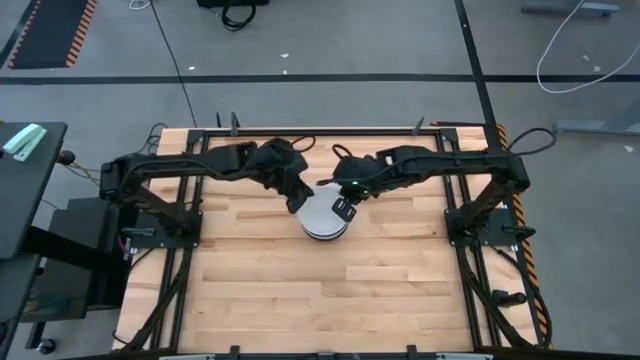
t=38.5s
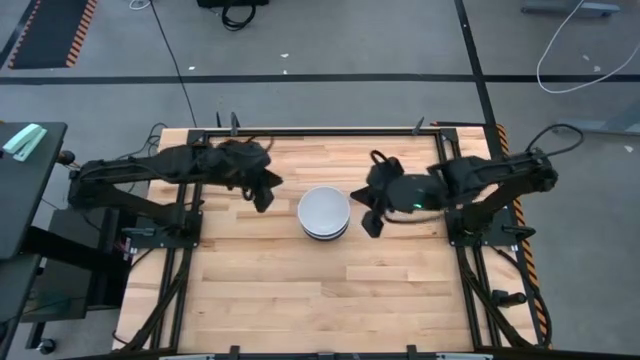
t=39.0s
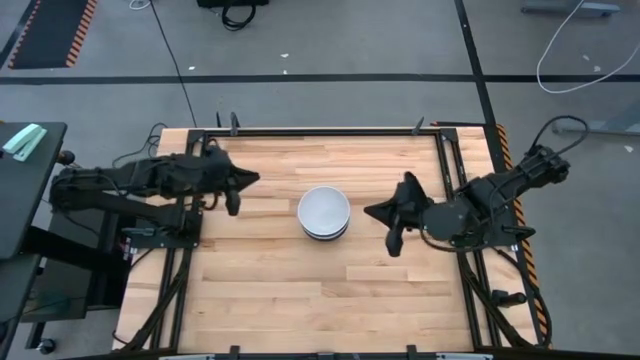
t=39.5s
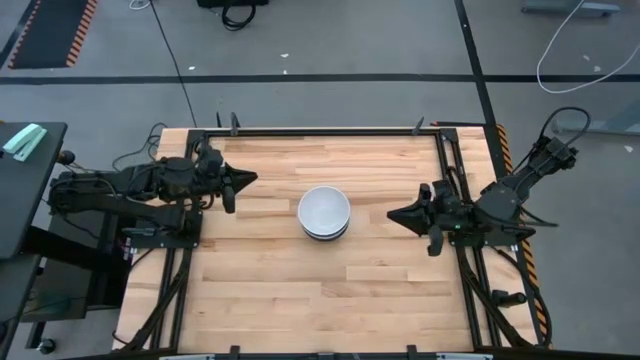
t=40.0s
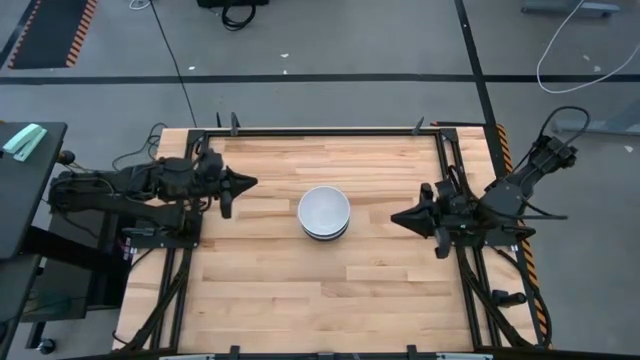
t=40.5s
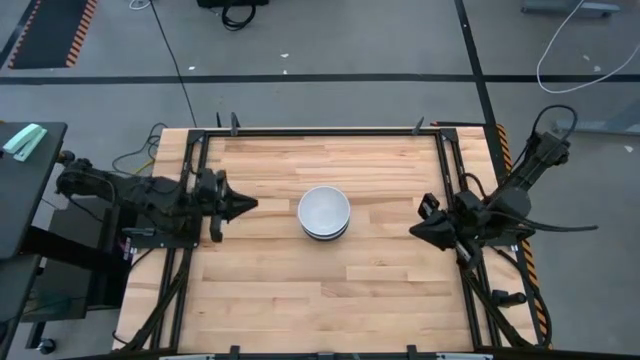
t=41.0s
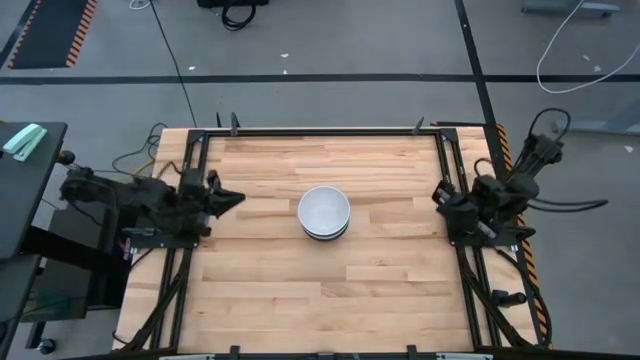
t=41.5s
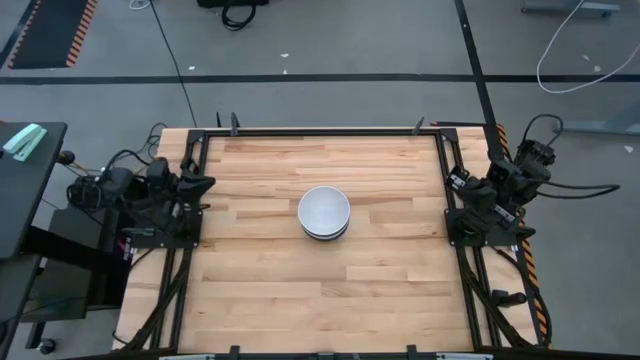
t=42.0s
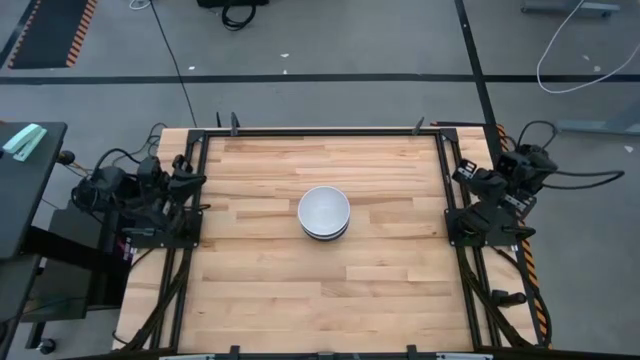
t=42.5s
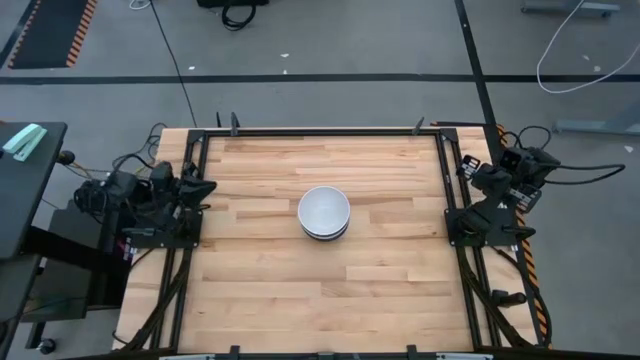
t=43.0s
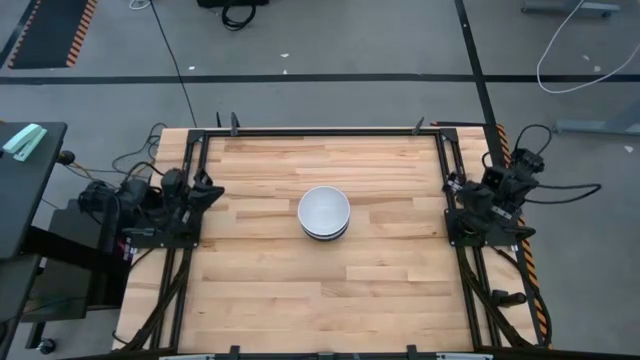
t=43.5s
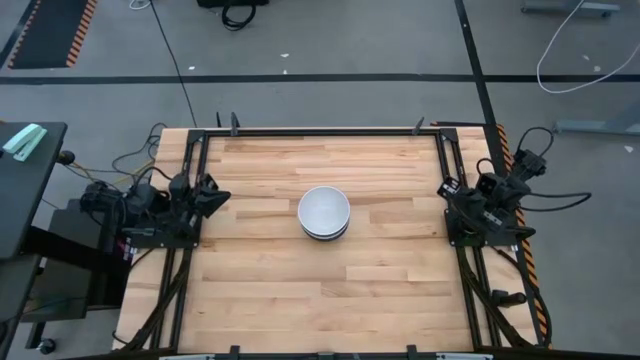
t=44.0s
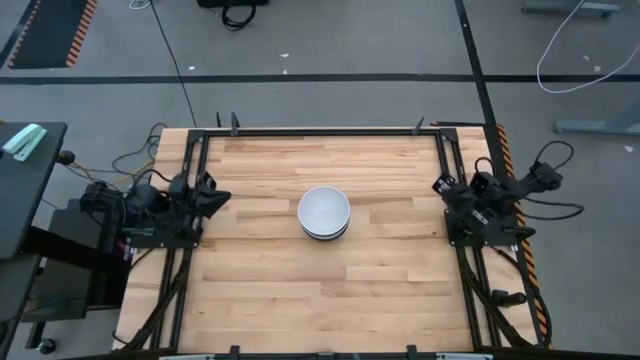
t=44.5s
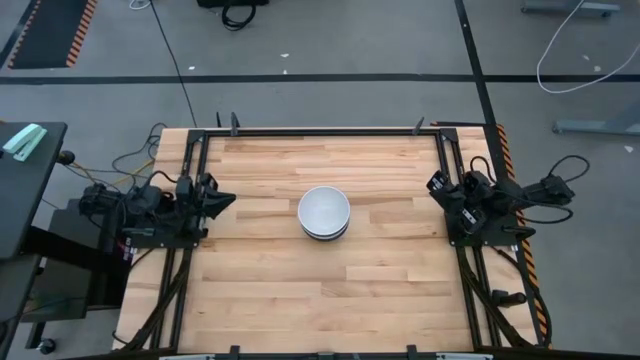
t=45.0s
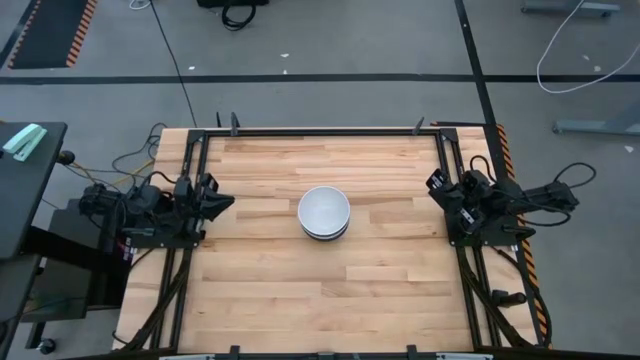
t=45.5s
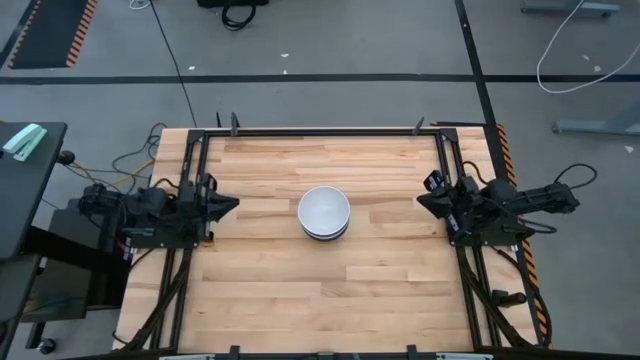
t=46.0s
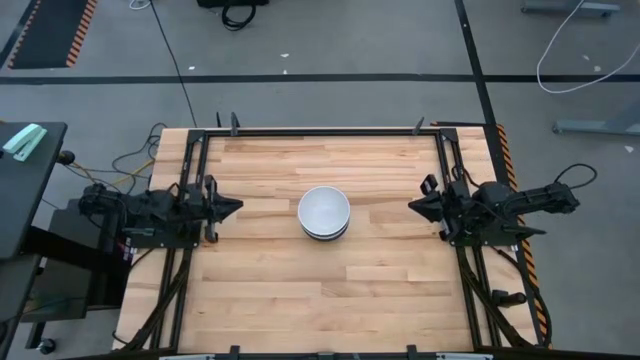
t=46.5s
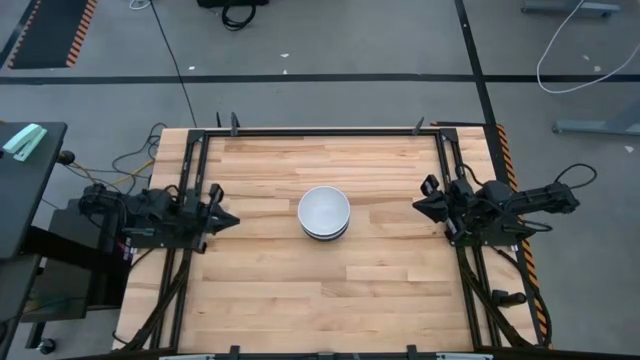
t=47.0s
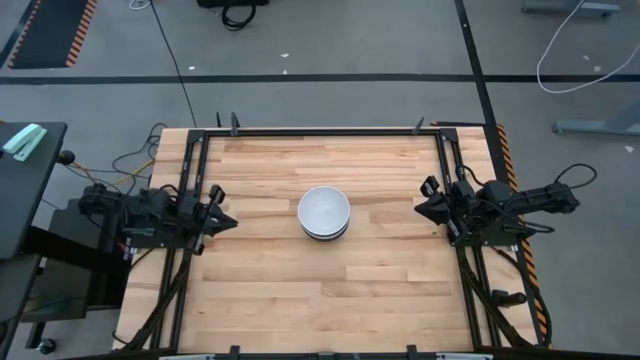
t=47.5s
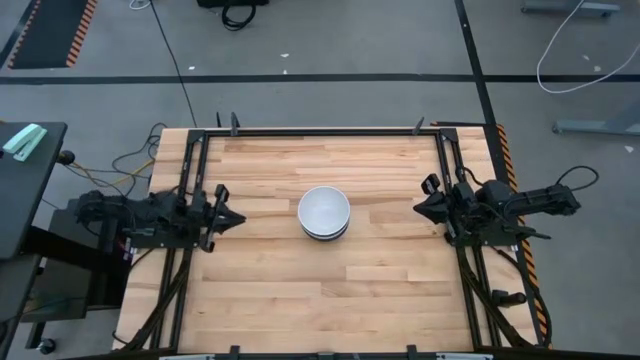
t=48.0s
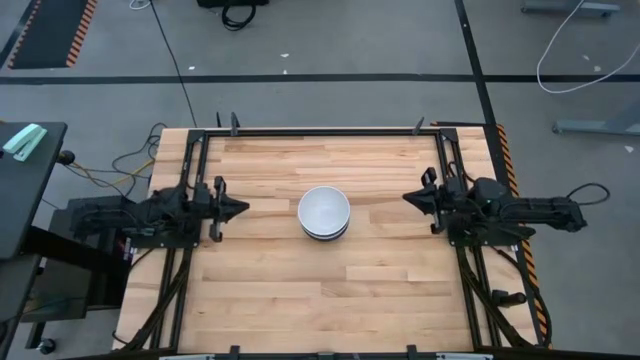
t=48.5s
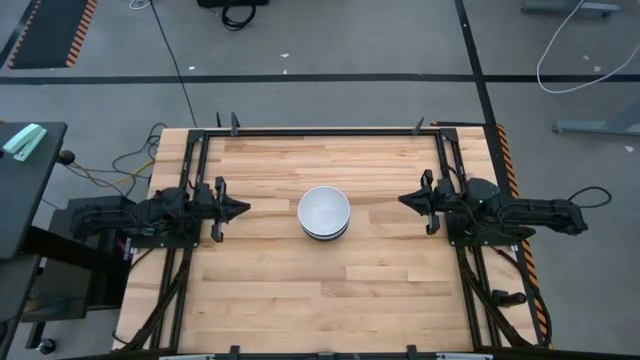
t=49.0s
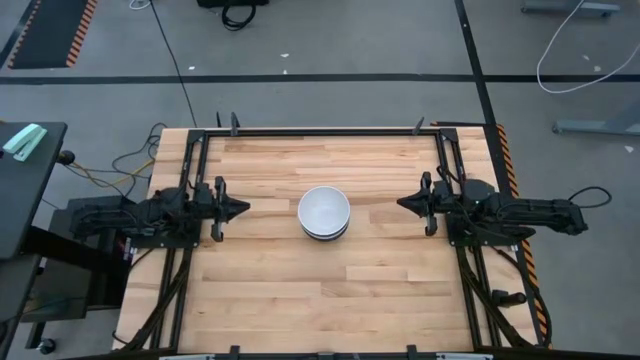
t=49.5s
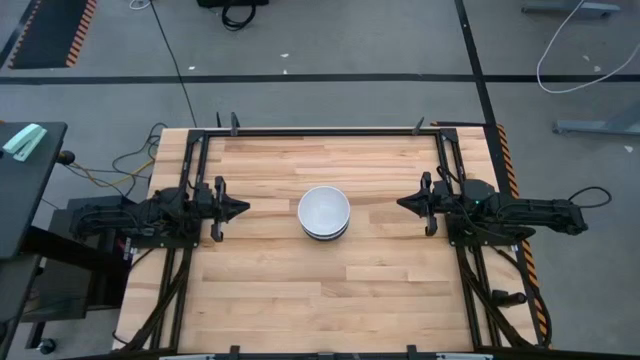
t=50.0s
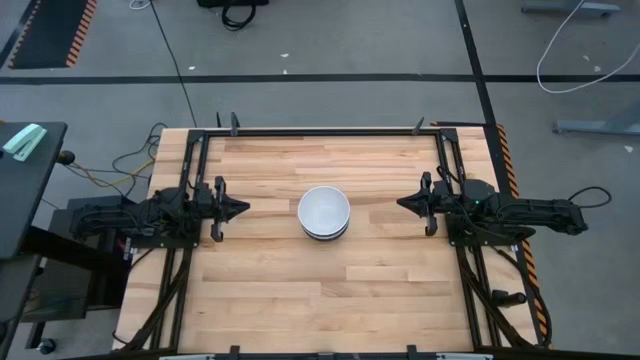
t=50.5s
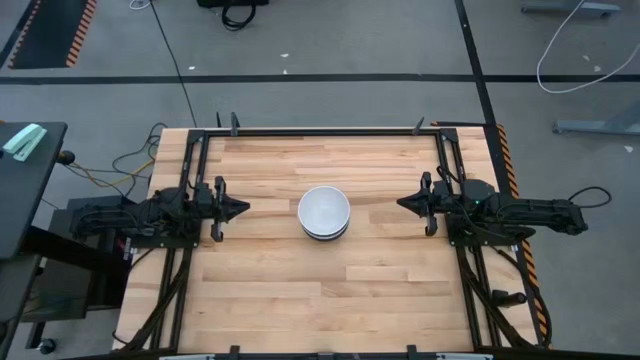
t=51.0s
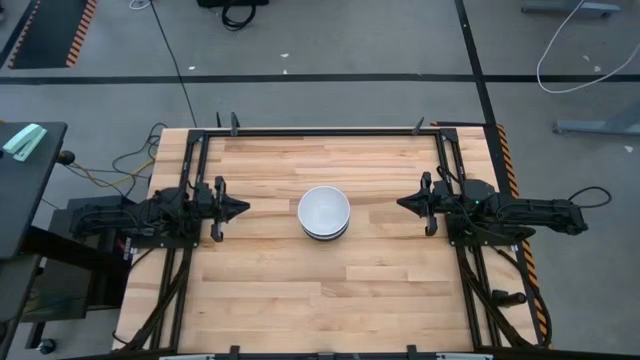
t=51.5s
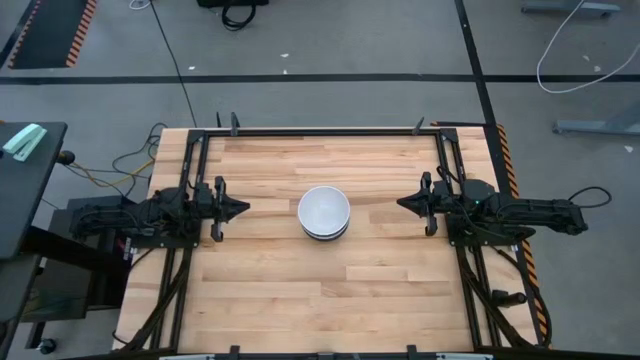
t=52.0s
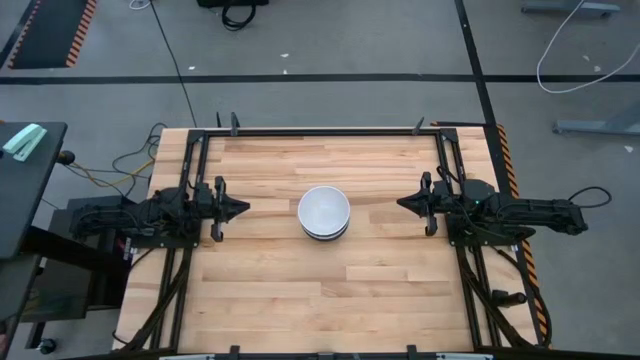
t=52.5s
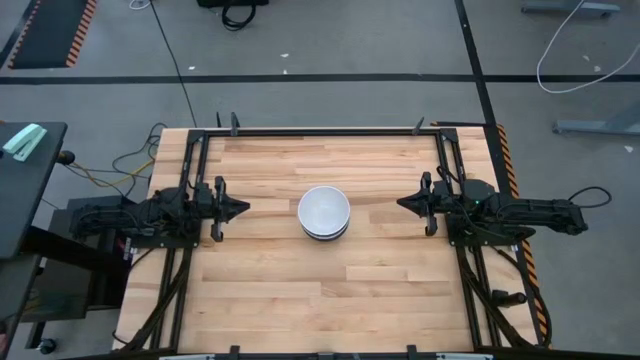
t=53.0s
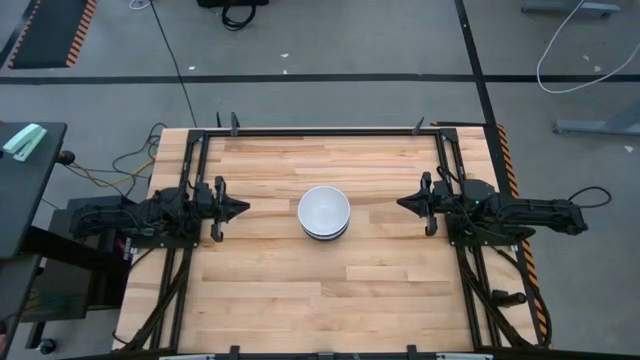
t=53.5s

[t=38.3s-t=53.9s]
Task: Nest bowls inside each other
Return to Home Position

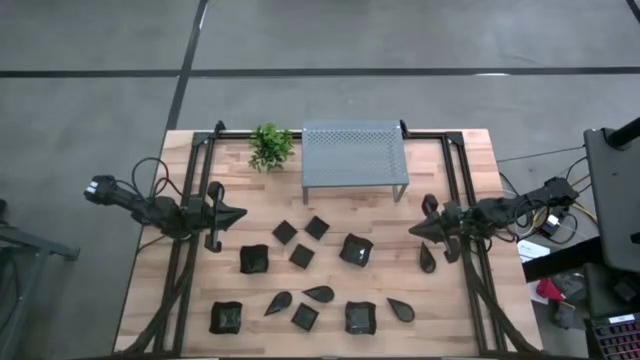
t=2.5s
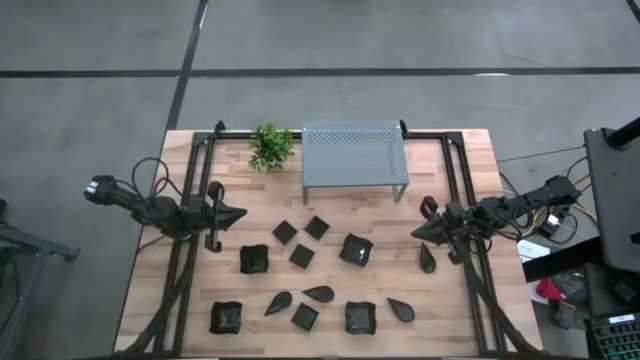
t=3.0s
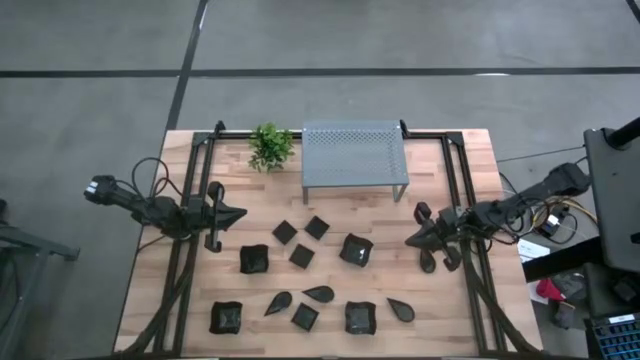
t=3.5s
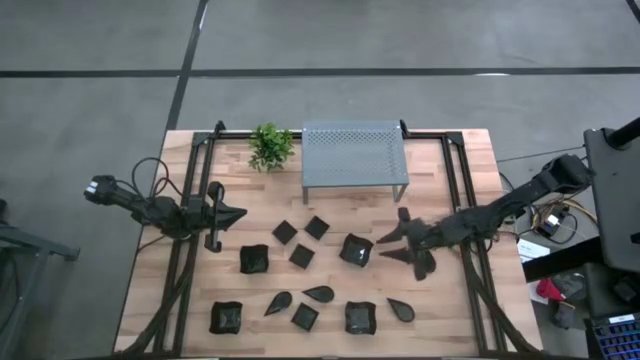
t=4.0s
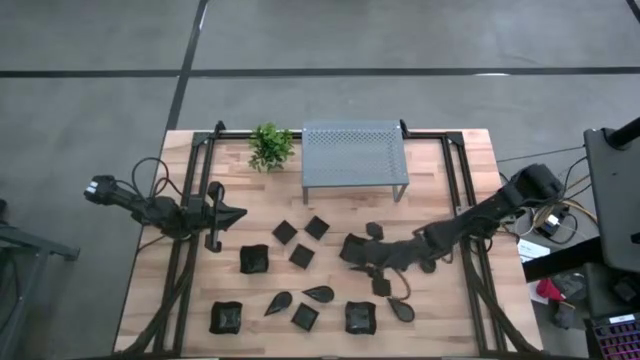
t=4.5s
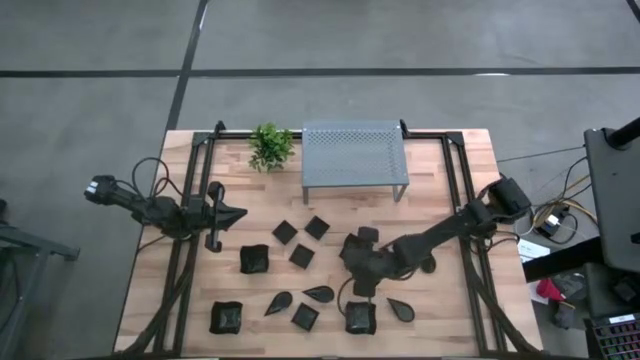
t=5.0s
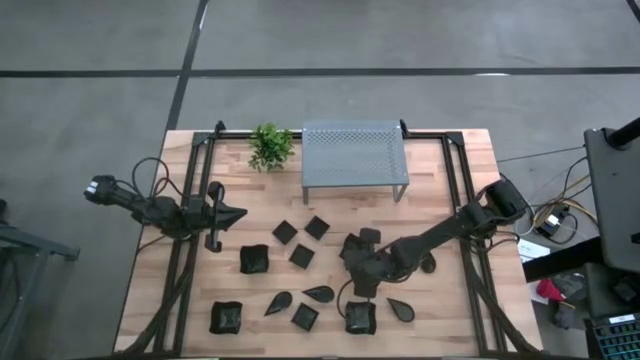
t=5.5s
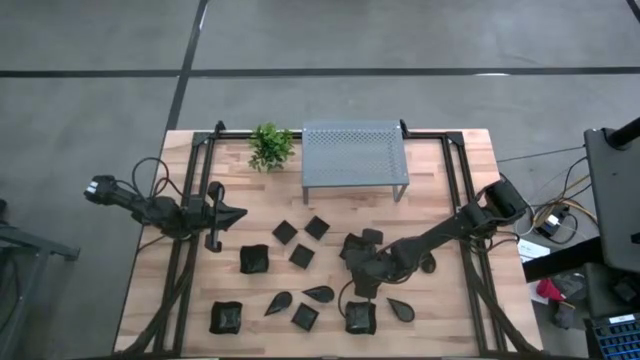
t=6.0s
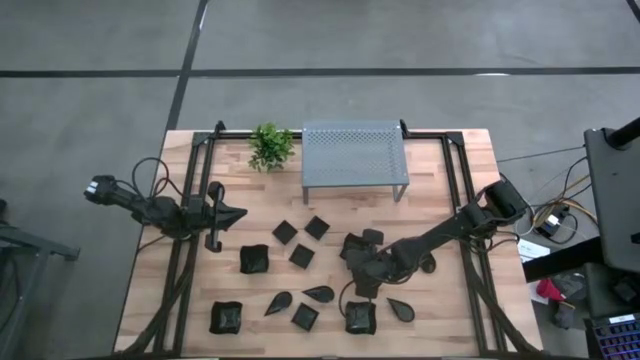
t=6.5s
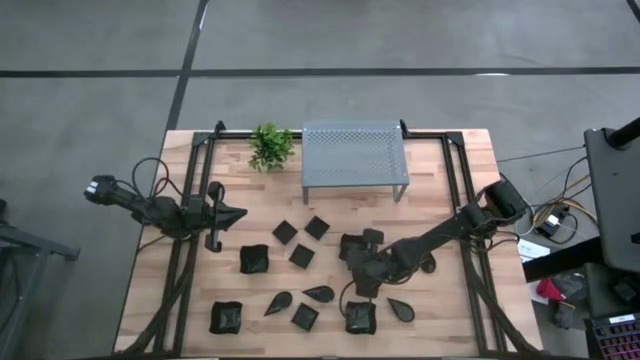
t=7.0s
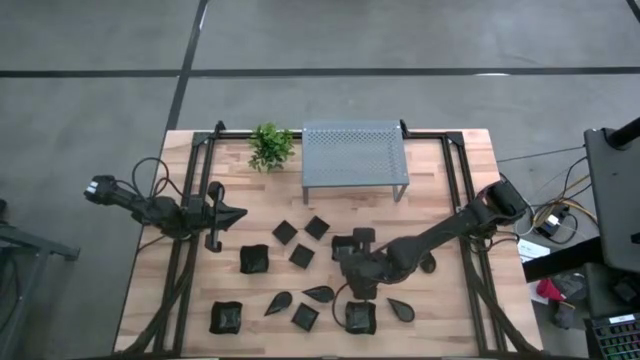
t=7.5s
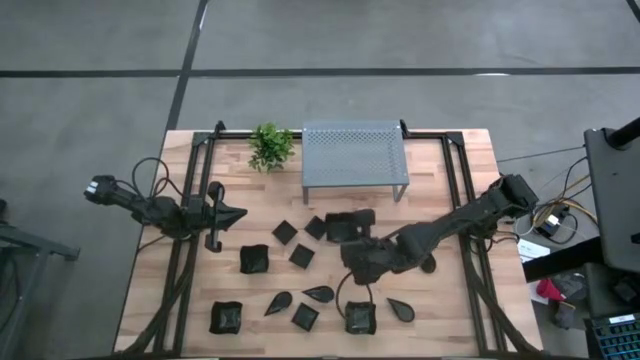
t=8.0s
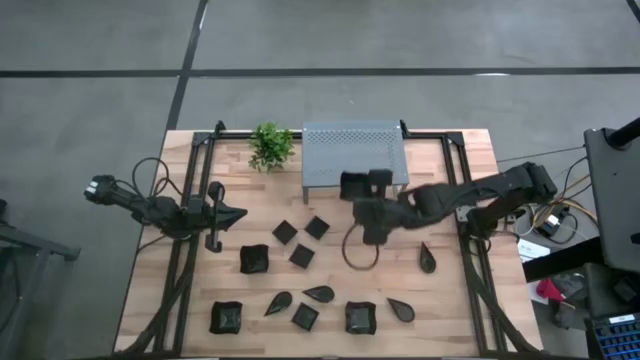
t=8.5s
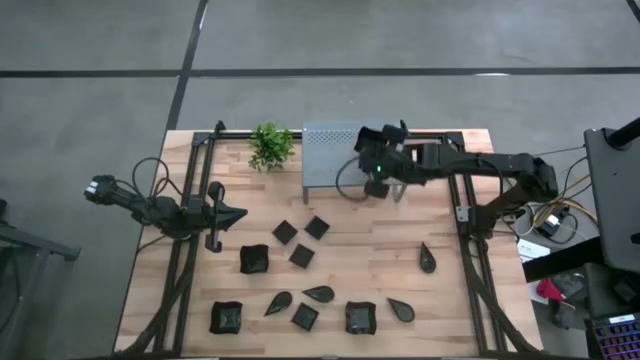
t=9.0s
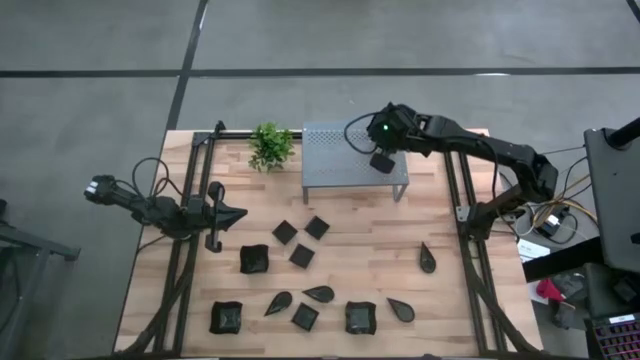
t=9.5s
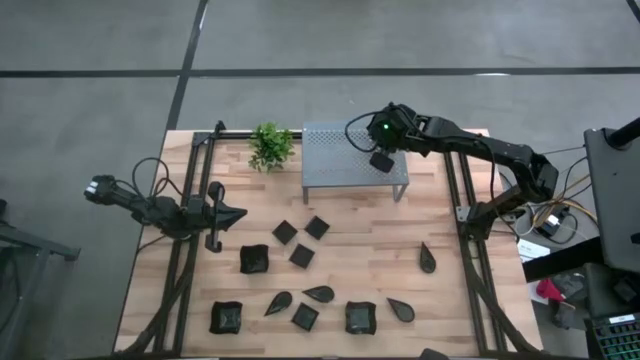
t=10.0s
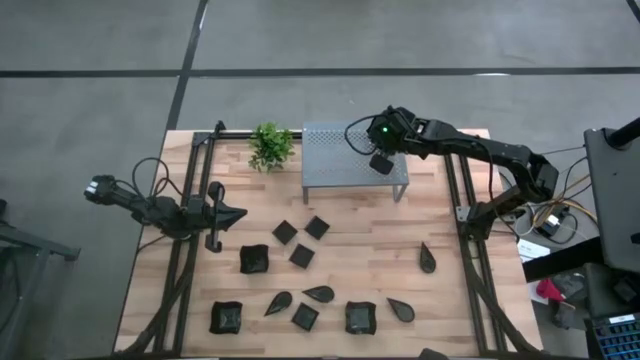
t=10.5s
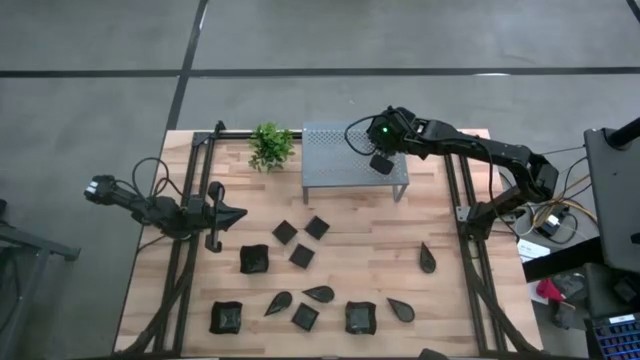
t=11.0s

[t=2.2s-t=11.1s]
Task: Pick & Place Mini shaped plates
Put the distorted square plate on the shelf
